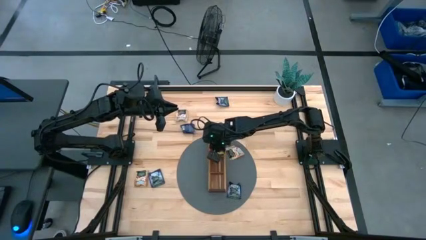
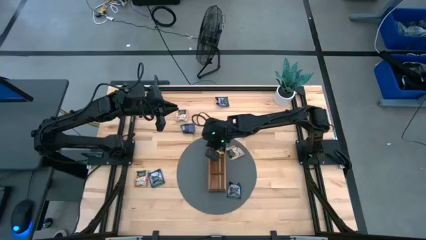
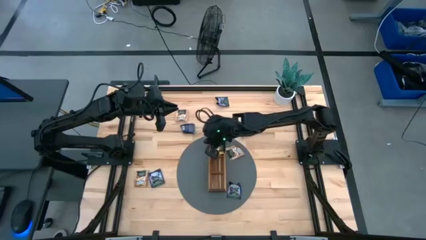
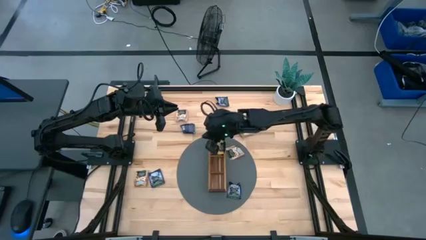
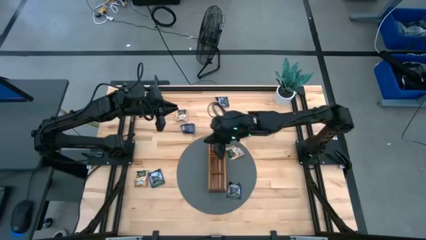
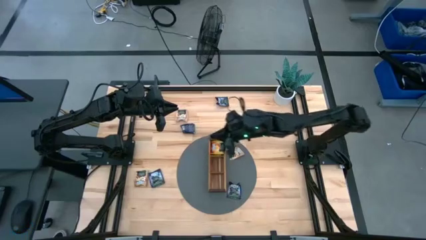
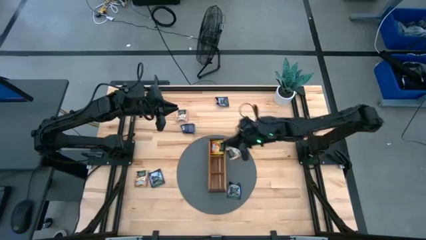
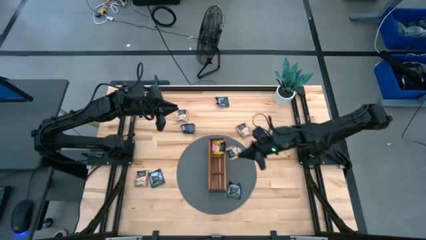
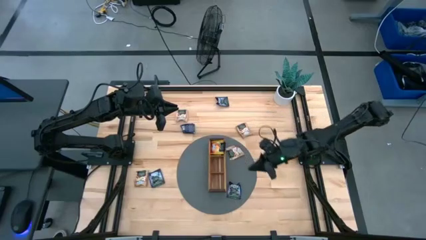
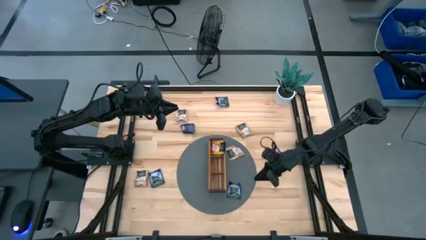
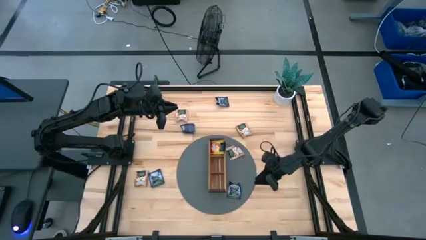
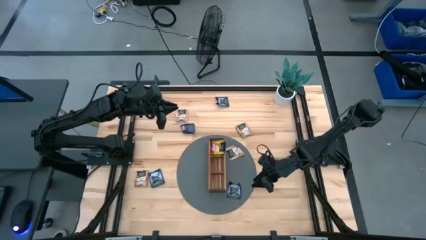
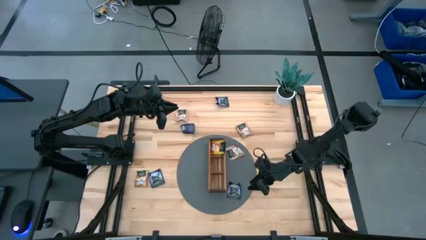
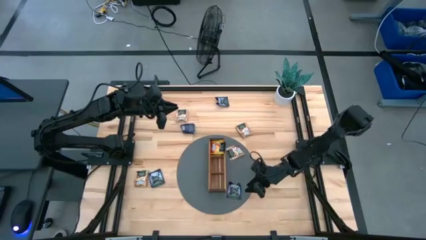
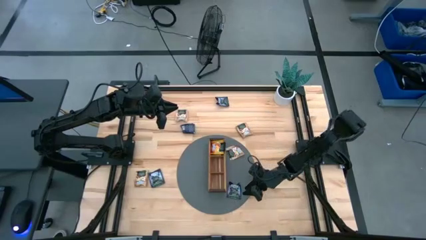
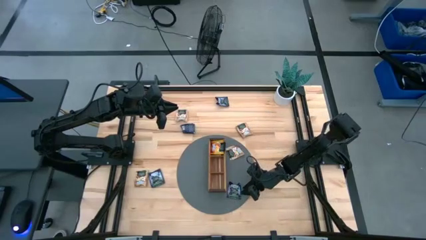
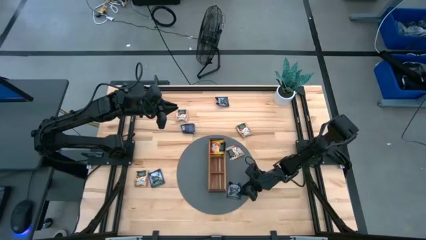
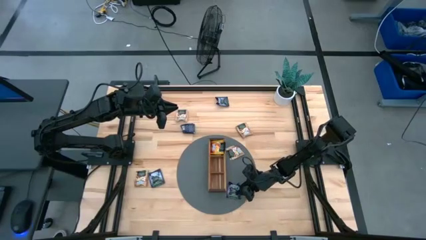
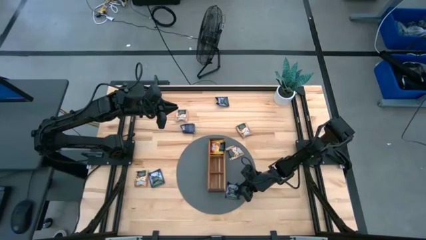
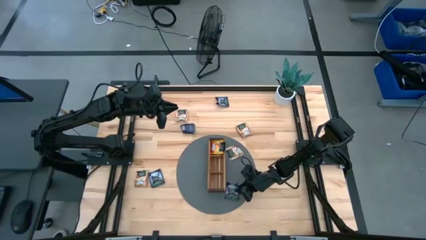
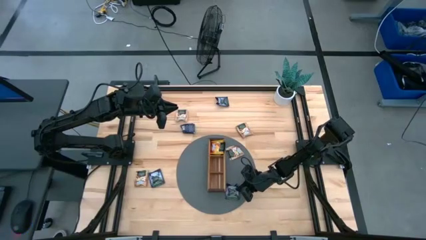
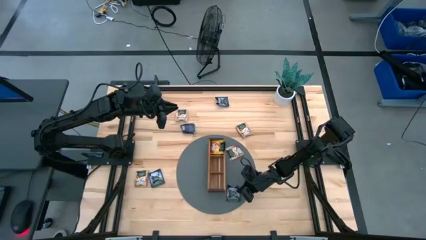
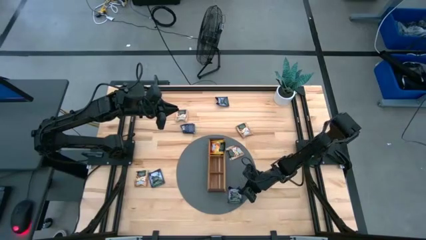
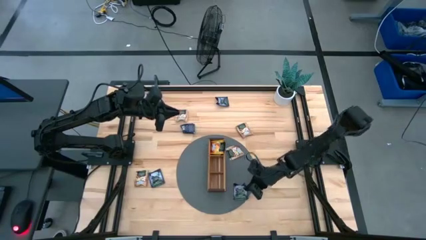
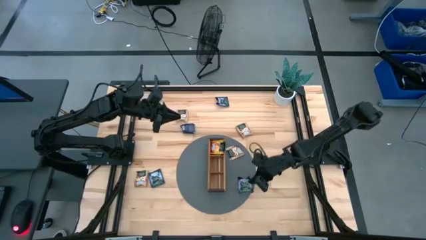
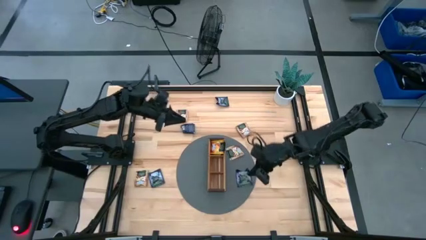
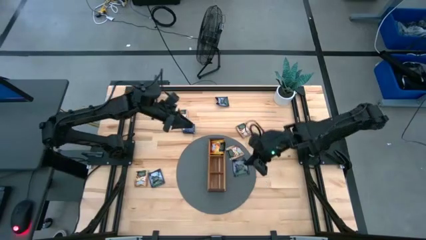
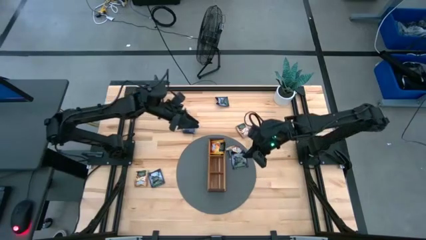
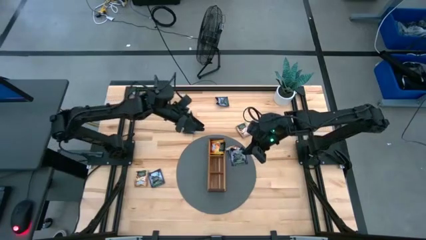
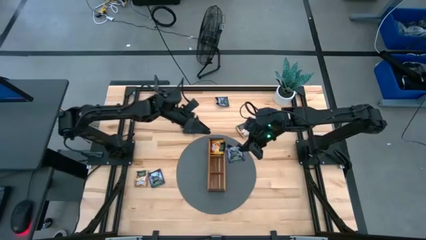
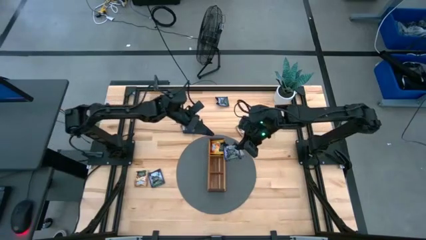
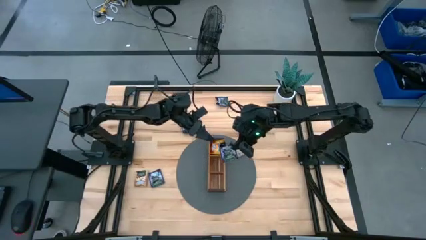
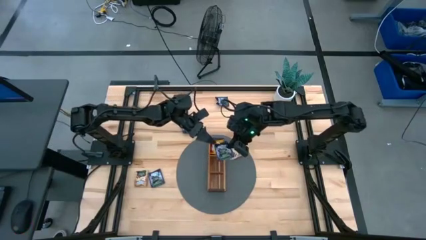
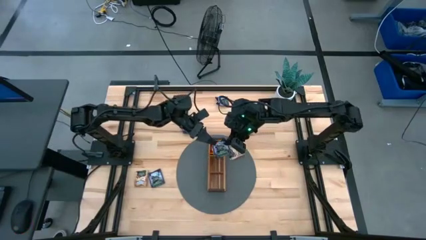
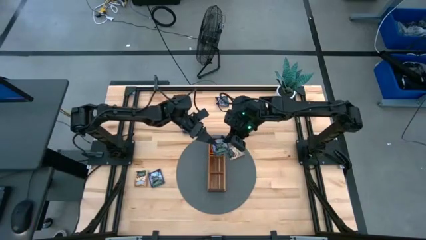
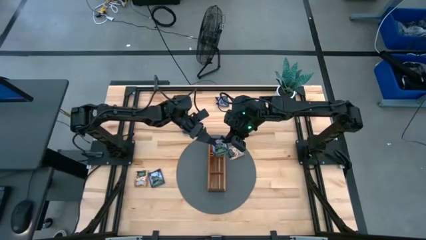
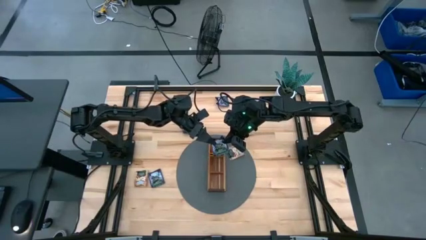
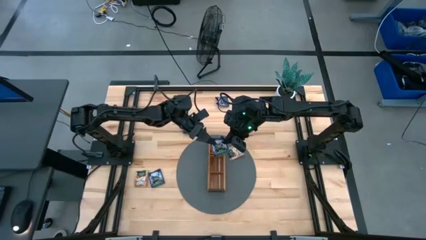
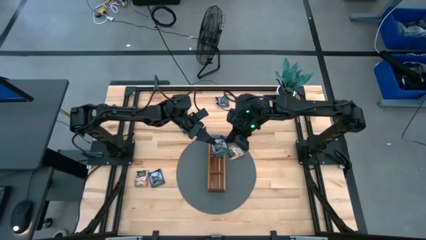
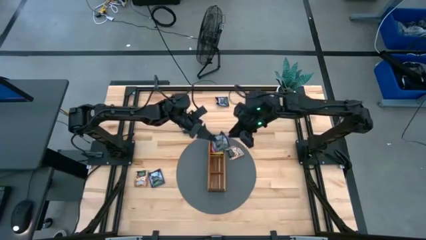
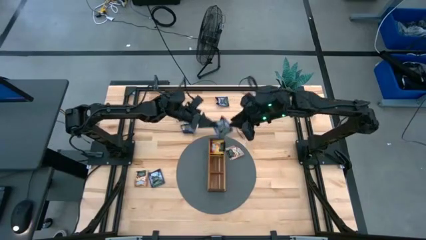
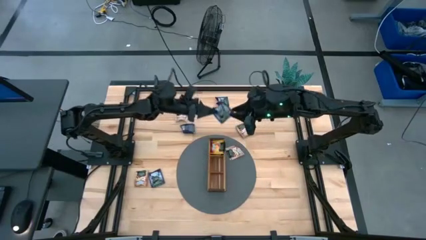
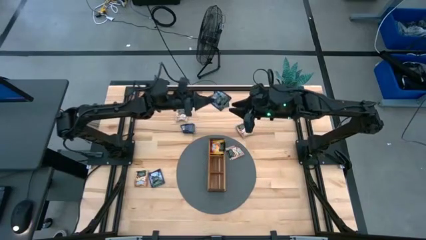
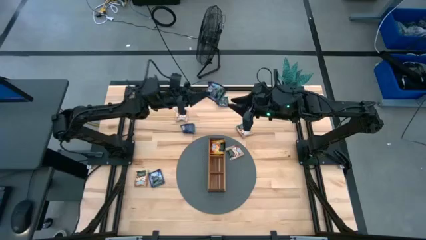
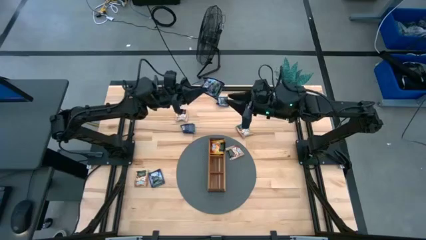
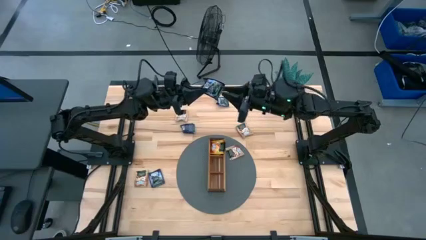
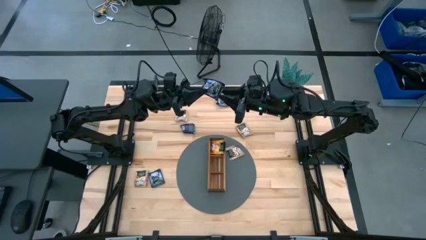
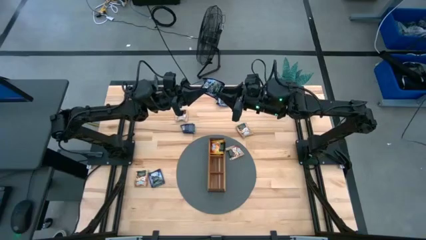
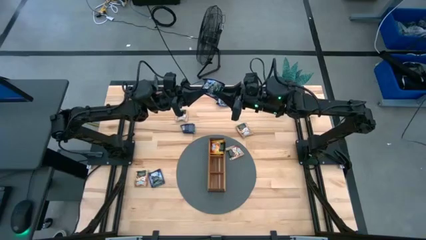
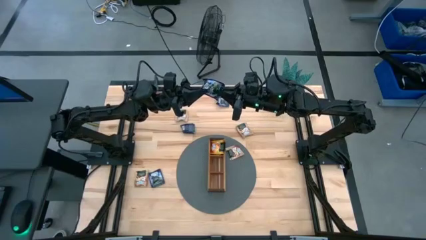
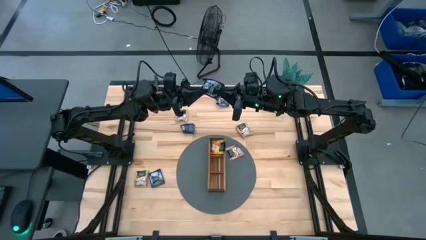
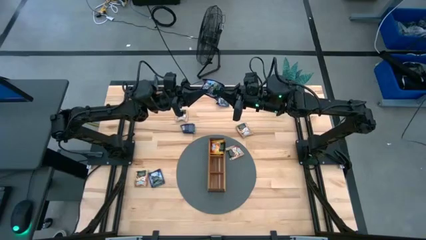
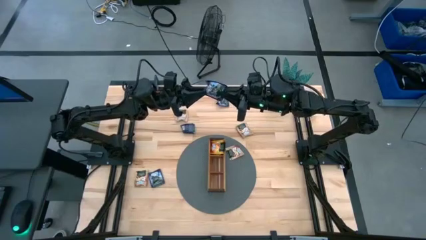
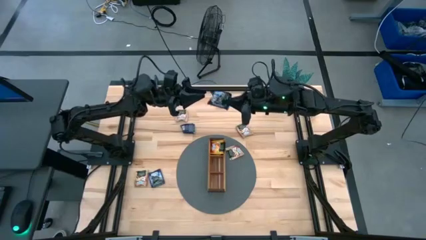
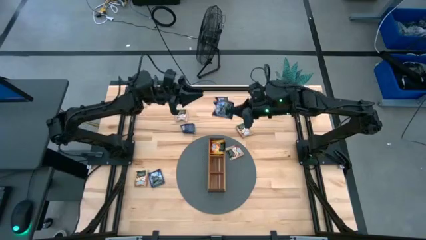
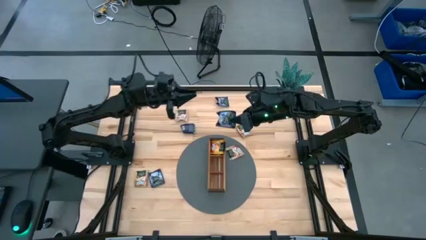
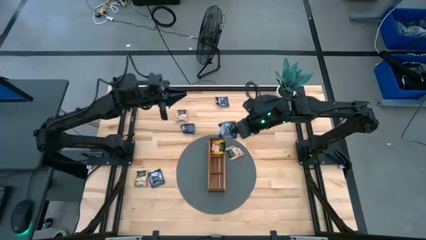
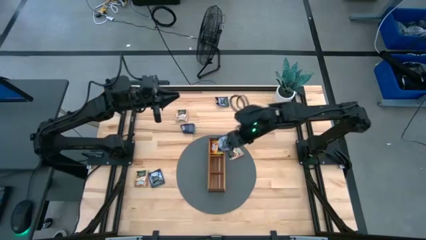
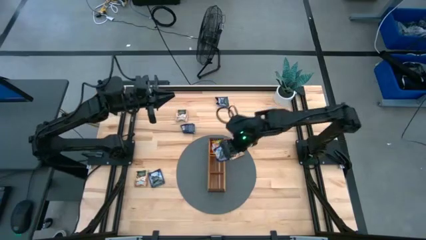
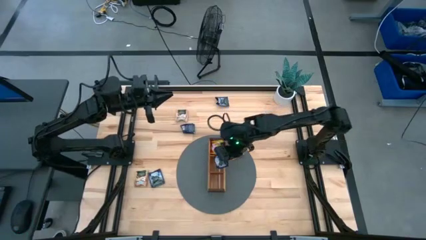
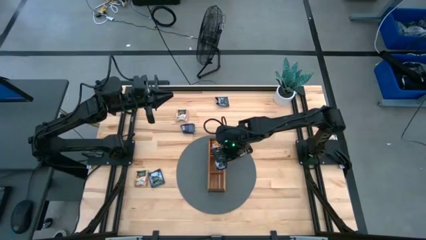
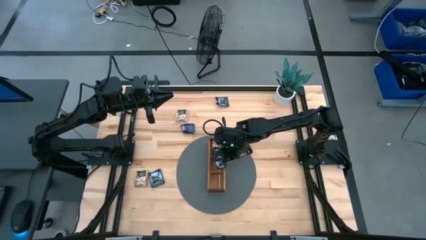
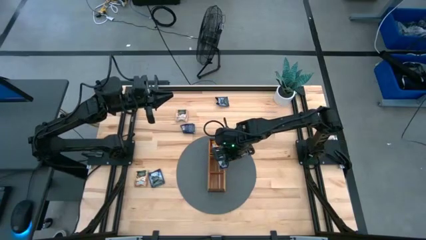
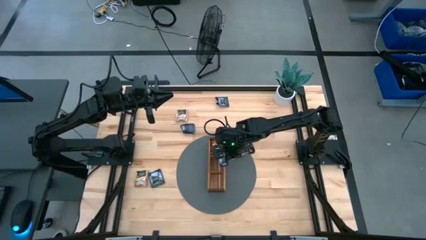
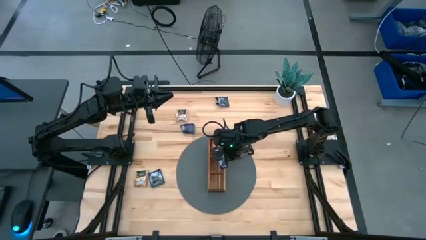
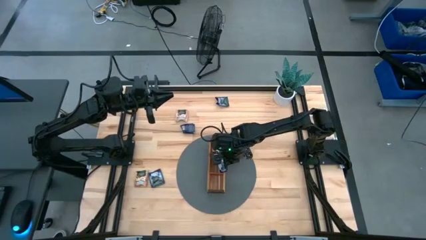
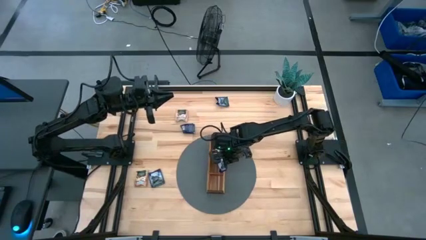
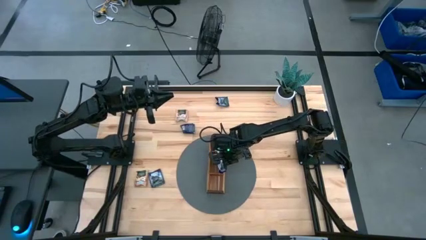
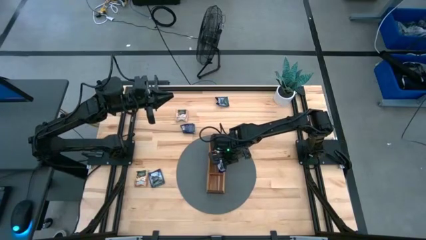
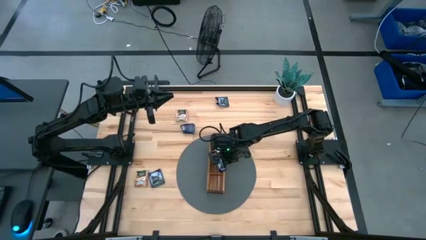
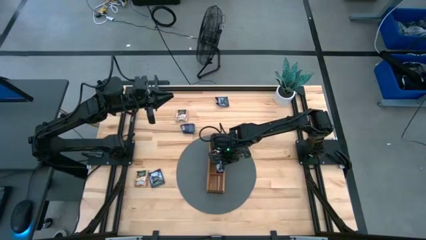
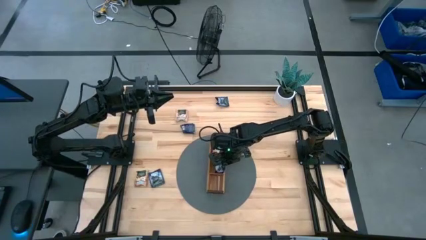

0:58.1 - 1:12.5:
Task: Pick & Place Tea
Put the purple tea bag into the middle section of the wooden organizer

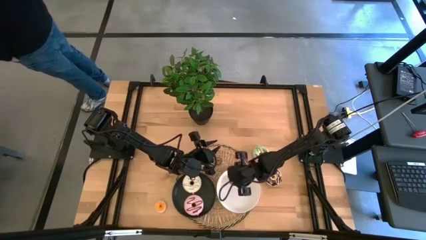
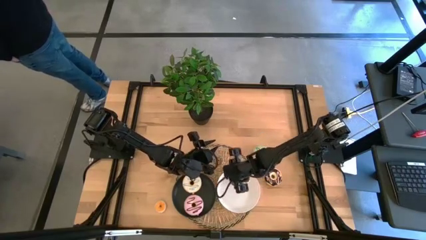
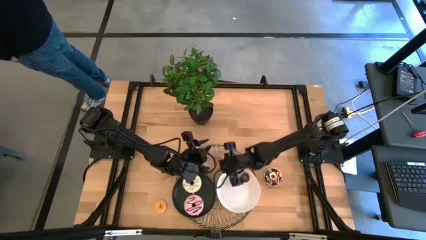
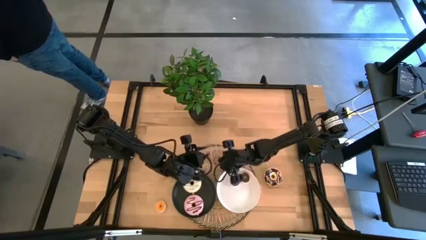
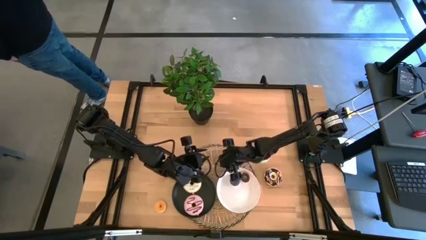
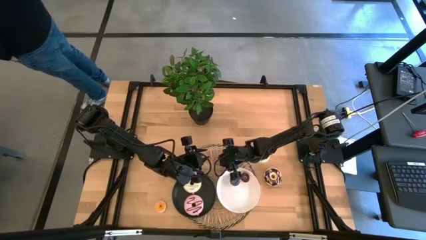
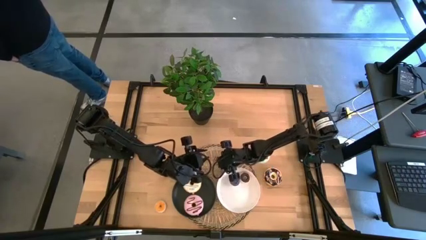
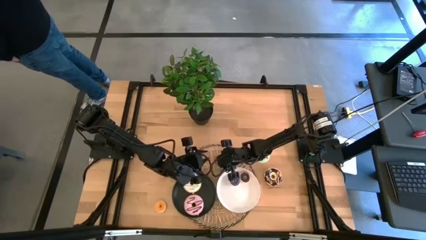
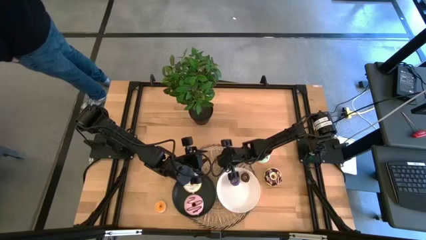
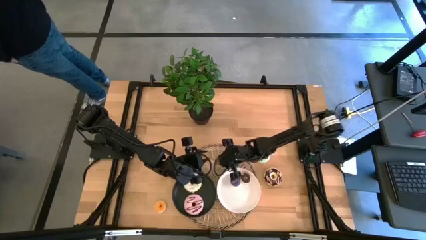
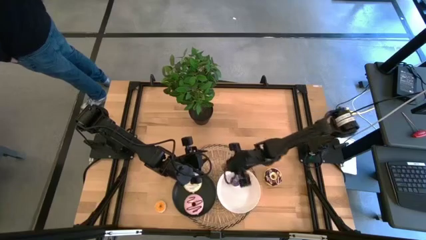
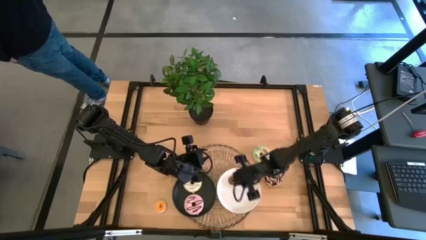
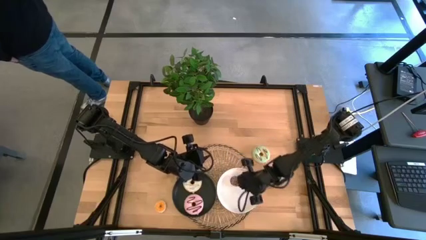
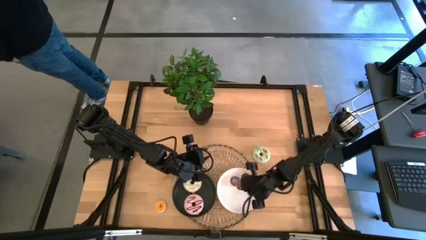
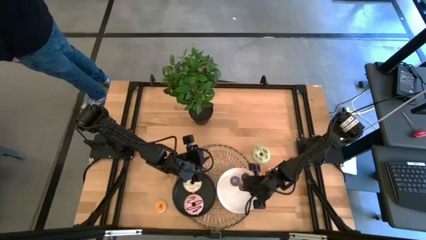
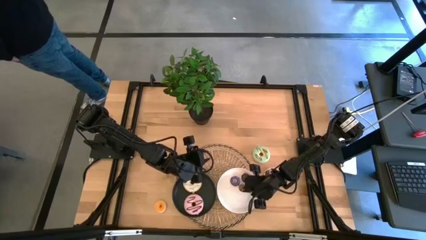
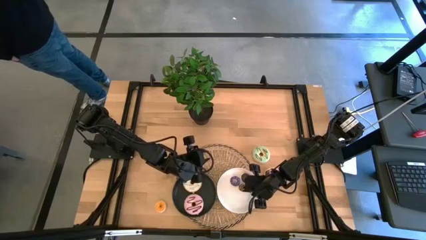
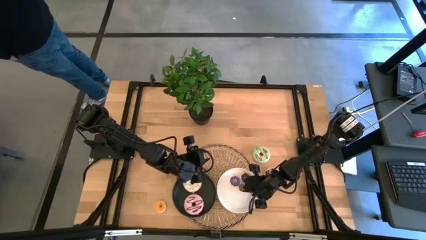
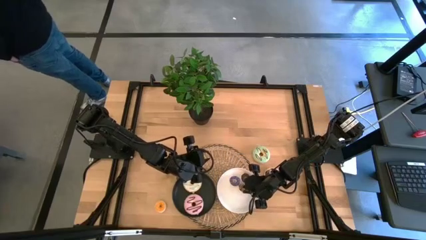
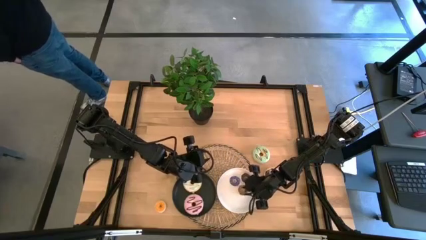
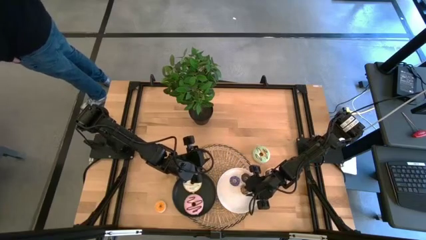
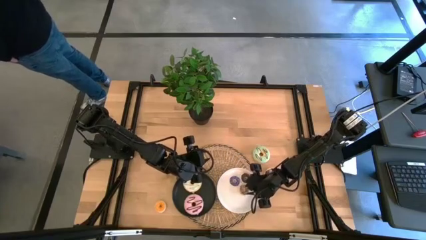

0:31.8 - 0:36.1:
Task: Pick & Place donuts
Put the small brown donut on the white plate
